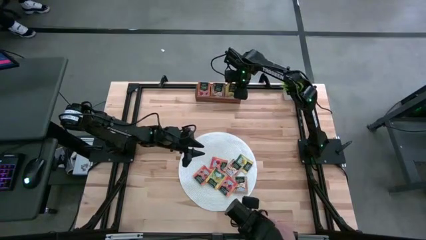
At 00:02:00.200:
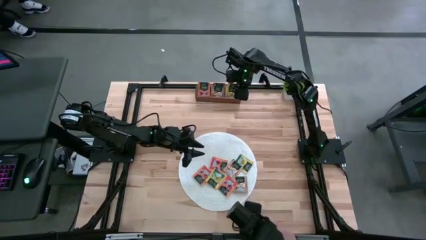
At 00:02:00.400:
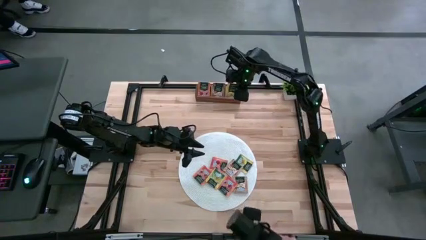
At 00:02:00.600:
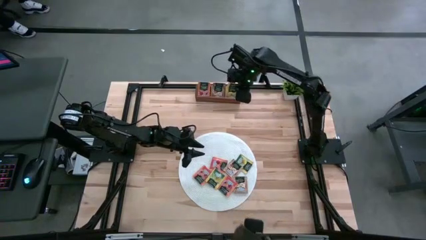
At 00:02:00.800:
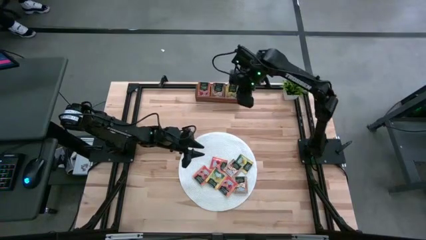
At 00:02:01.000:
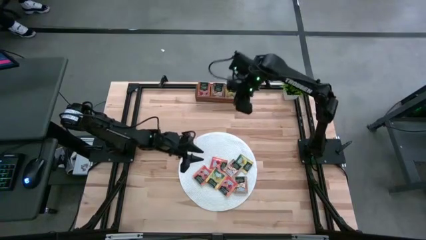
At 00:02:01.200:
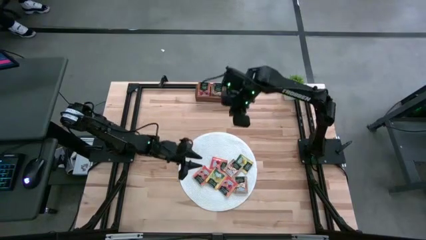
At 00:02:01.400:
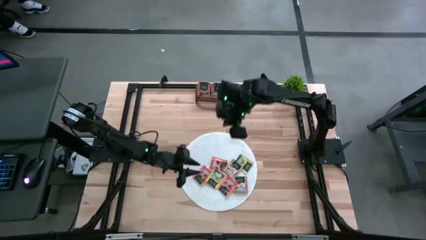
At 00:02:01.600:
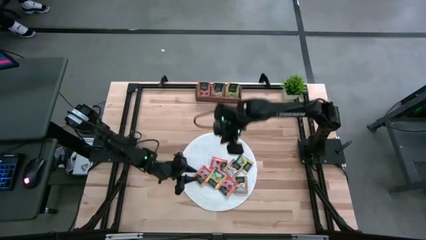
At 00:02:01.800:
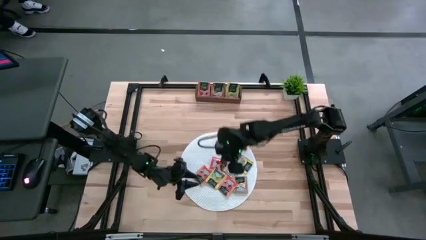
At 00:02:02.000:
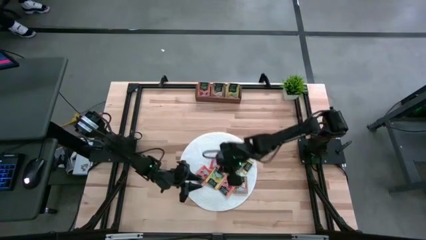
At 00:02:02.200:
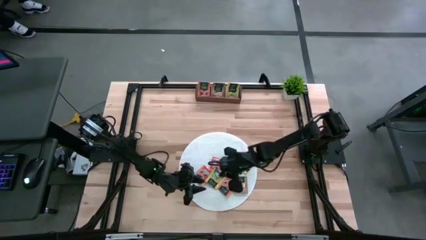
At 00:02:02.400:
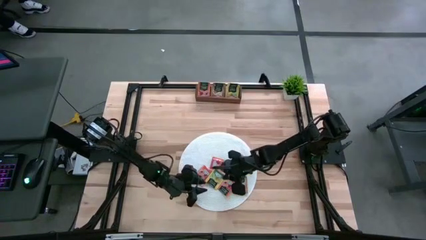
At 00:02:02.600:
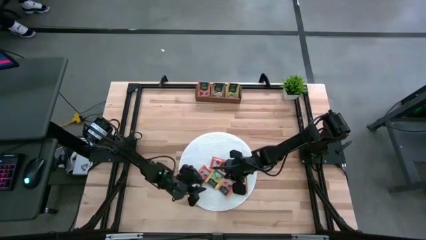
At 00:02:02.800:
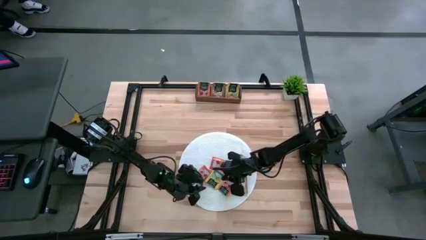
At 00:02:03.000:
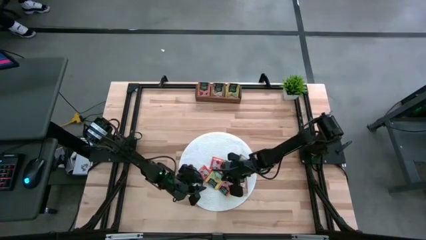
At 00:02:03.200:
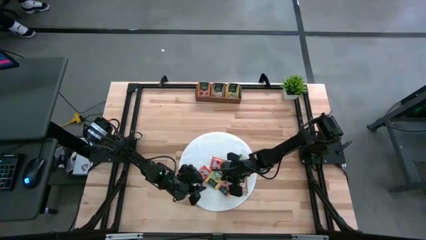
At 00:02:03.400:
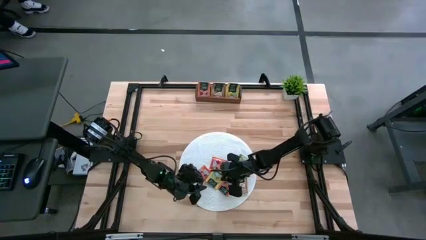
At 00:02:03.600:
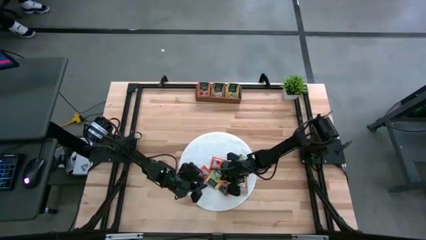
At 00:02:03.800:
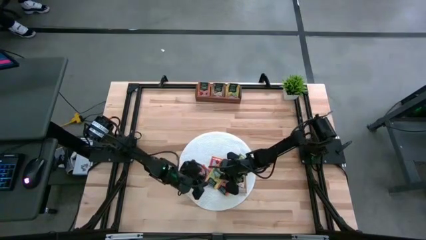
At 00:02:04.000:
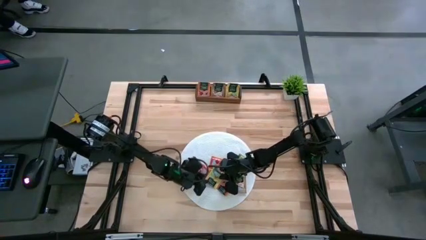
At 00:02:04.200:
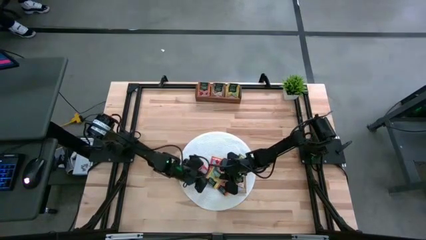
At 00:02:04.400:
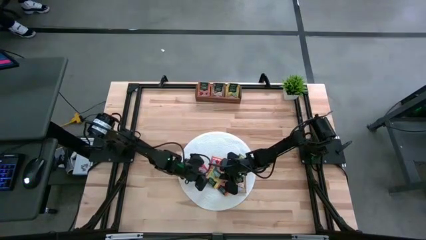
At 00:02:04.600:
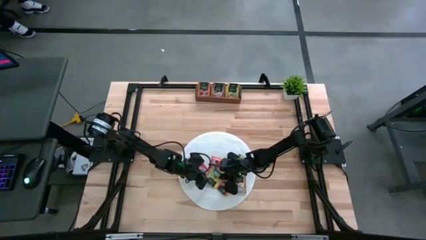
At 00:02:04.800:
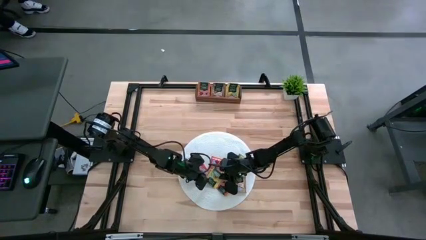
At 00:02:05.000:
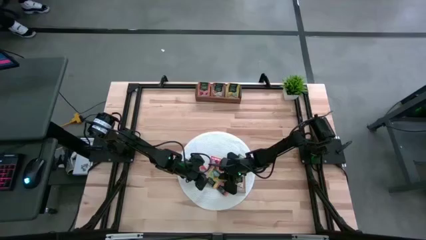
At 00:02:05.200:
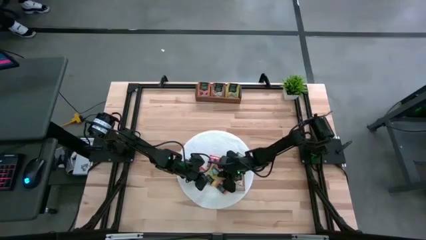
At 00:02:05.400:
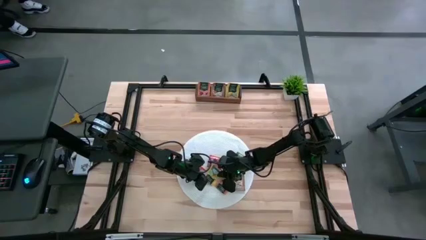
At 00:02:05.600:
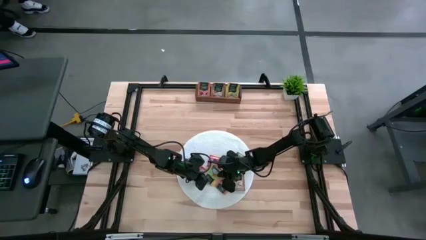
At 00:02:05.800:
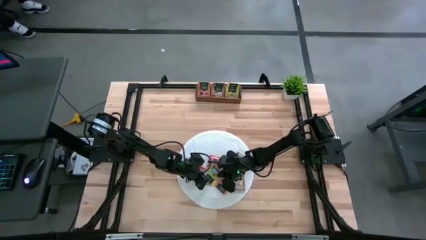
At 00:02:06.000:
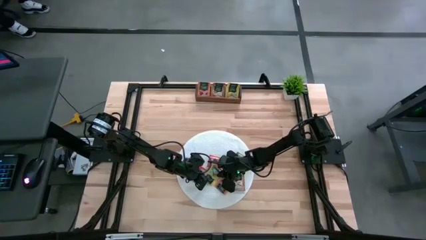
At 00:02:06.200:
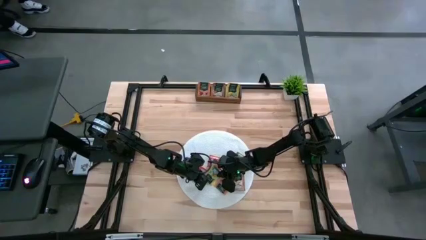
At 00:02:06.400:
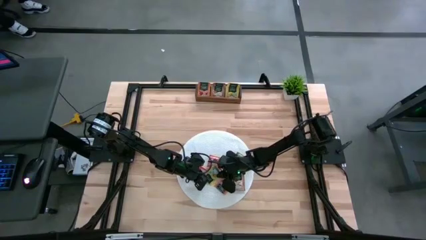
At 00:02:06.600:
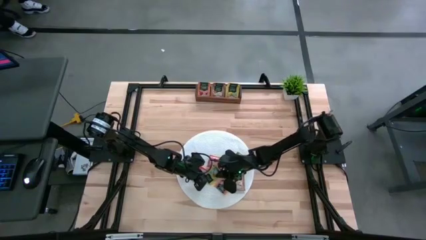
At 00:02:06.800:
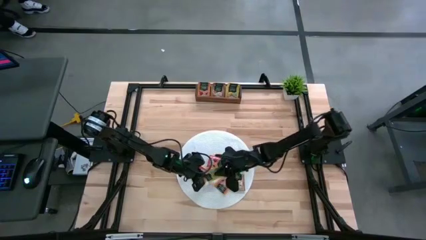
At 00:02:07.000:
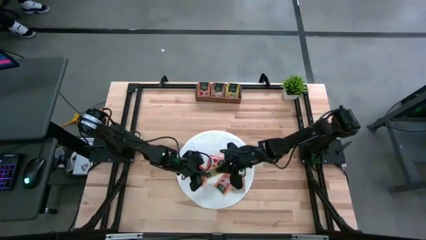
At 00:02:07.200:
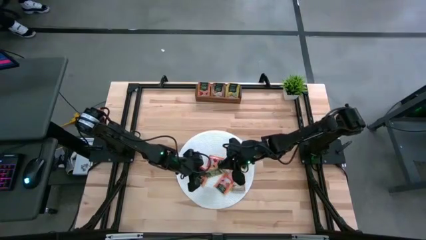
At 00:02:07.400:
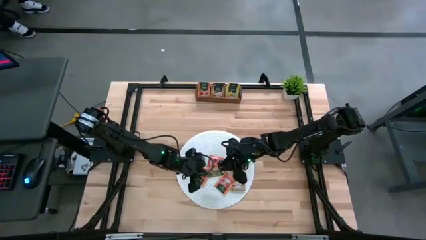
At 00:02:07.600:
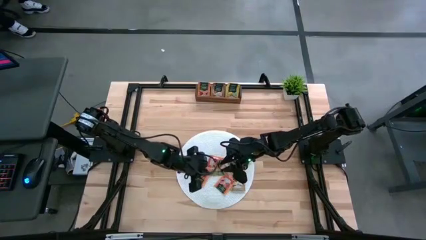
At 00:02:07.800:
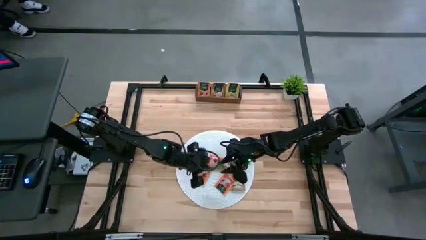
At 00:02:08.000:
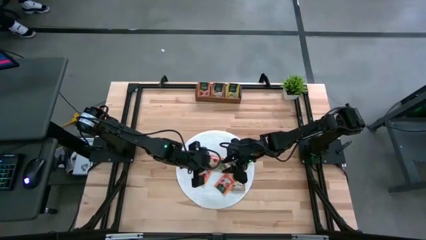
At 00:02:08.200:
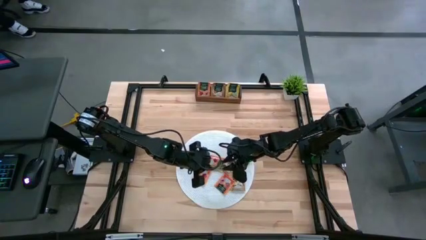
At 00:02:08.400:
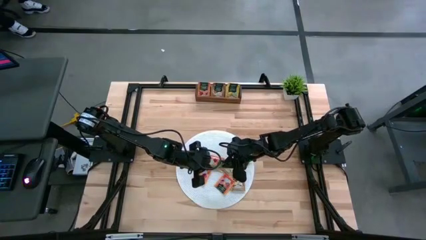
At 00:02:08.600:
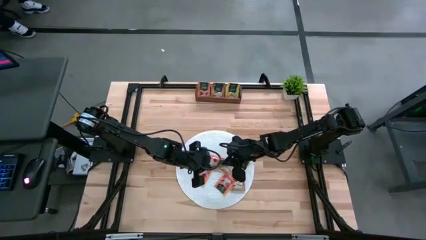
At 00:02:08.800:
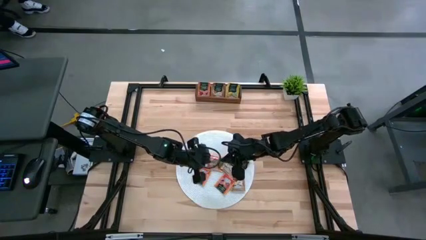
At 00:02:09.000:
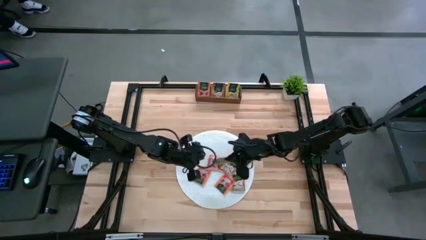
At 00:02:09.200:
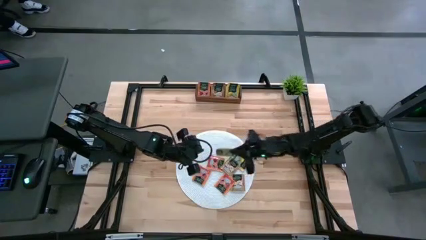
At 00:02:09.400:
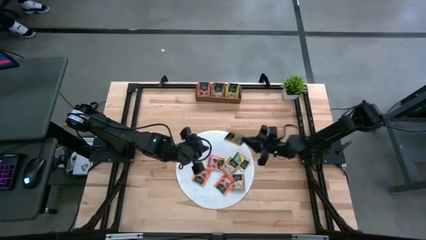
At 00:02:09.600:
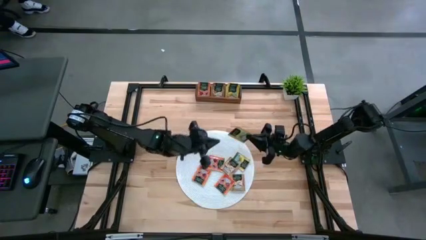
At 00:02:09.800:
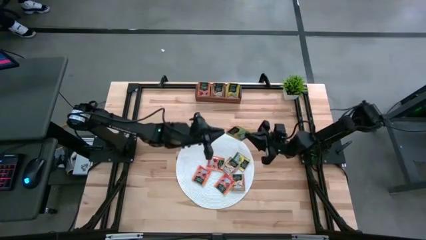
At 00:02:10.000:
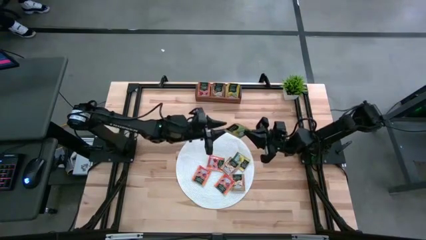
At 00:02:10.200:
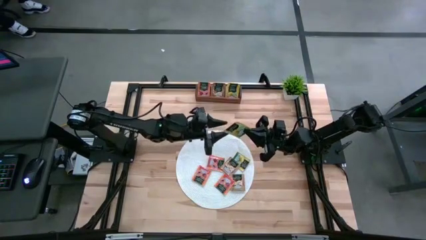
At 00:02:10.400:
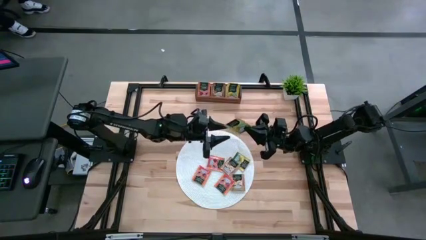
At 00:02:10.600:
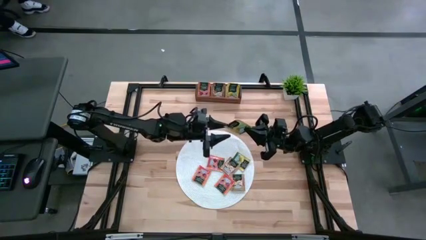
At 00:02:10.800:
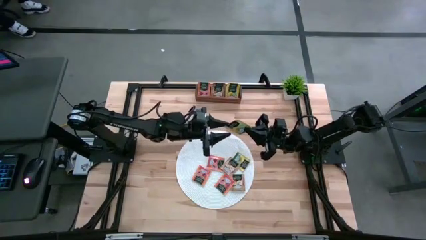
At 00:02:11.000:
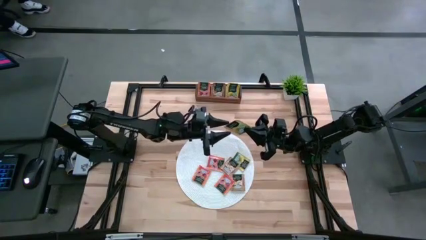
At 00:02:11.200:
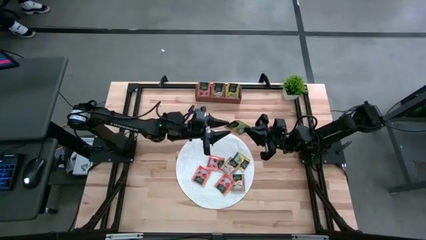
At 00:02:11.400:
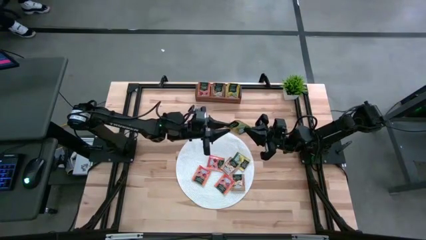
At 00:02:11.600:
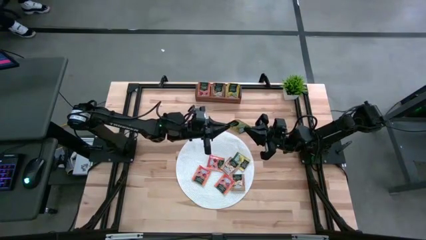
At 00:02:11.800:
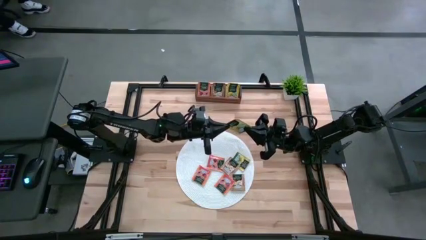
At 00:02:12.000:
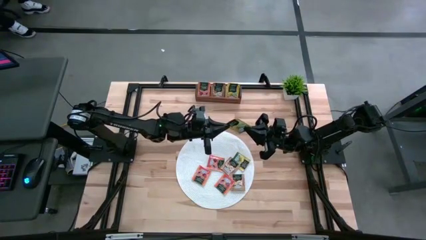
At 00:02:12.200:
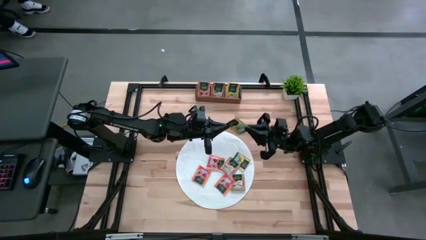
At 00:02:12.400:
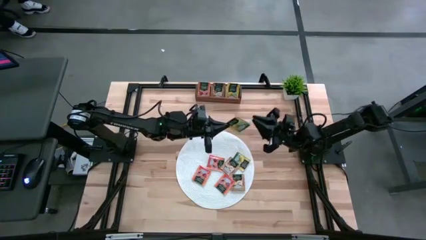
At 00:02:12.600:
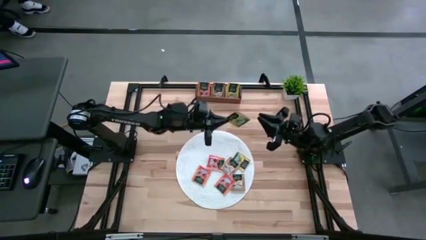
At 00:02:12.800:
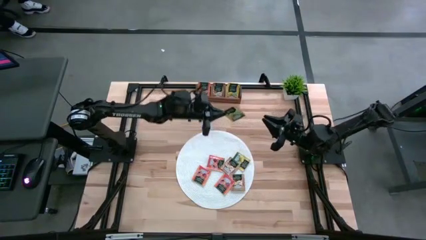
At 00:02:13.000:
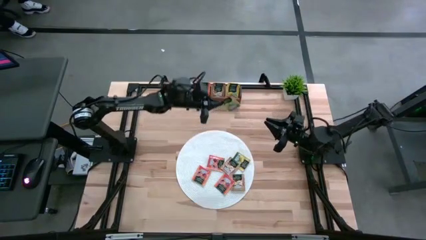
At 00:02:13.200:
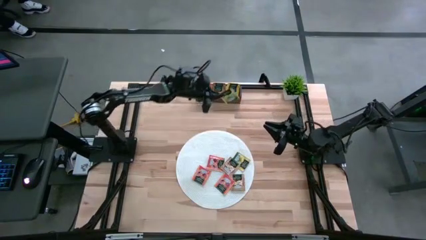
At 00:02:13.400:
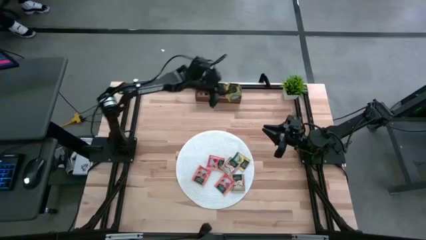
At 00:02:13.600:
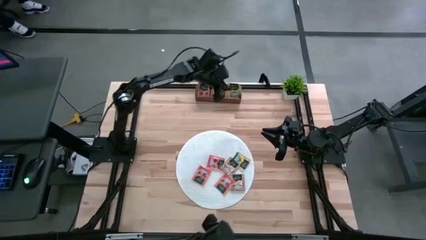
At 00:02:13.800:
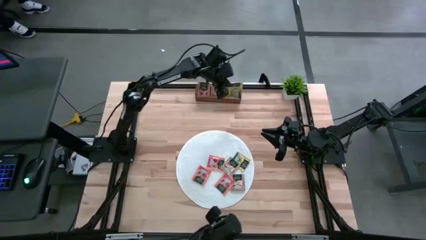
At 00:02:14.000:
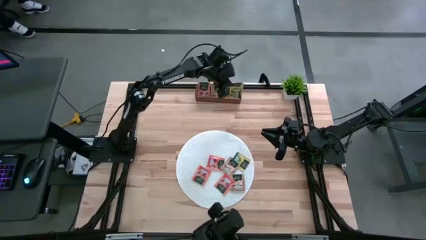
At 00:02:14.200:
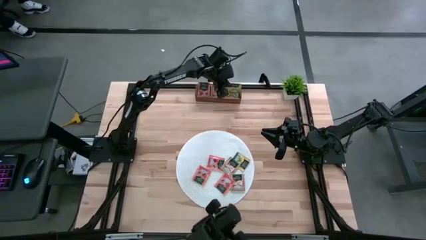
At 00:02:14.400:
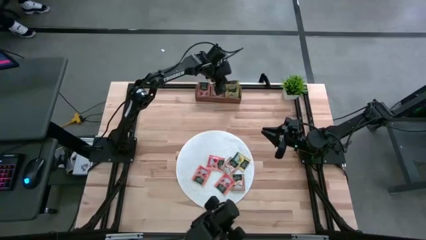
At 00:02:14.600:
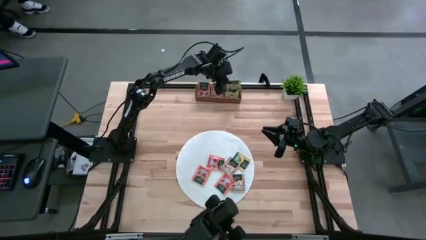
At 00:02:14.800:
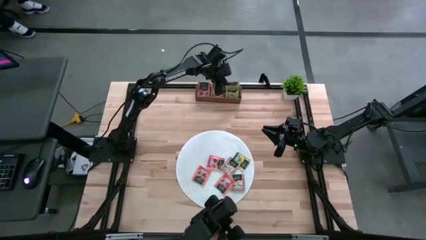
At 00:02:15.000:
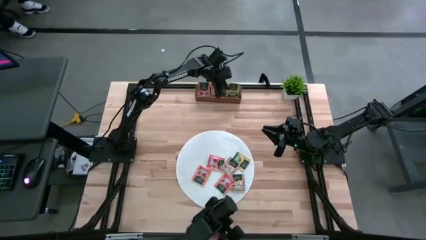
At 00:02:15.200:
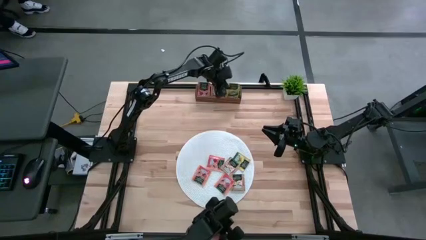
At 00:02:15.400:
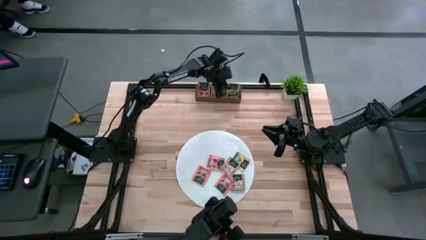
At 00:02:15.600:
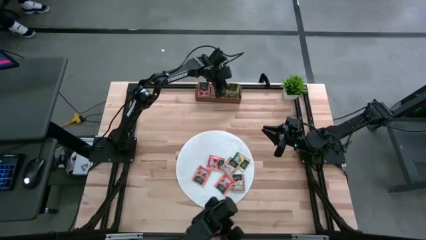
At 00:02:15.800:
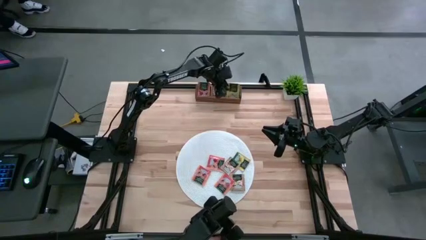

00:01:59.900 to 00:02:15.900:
Task: Pick & Place Tea
Put the yellow tea bag into the right section of the wooden organizer
